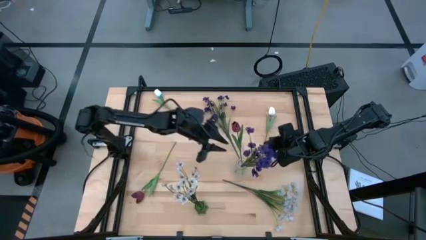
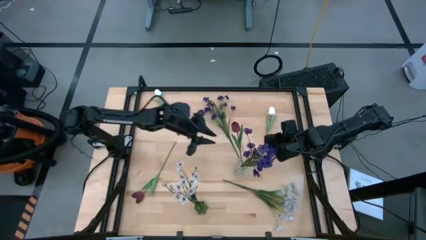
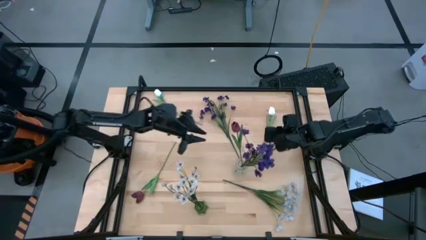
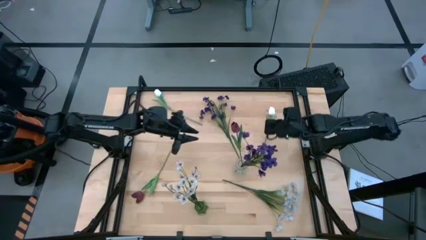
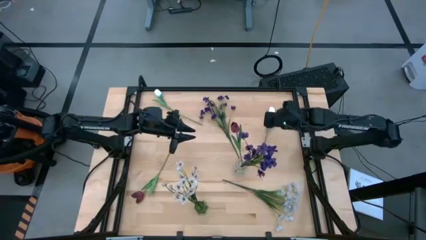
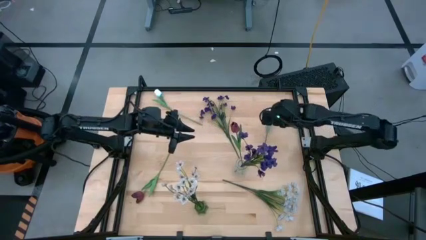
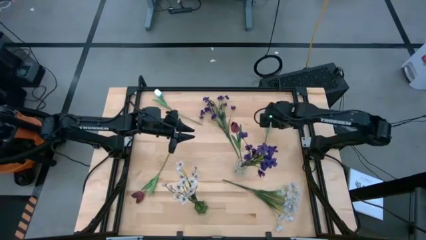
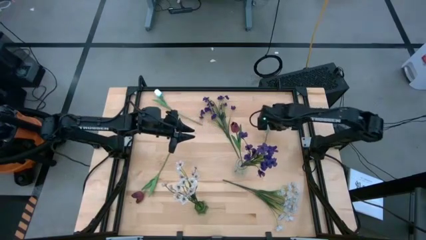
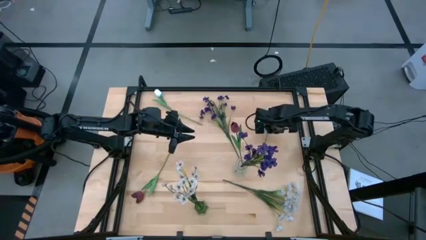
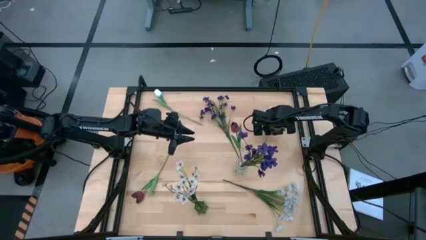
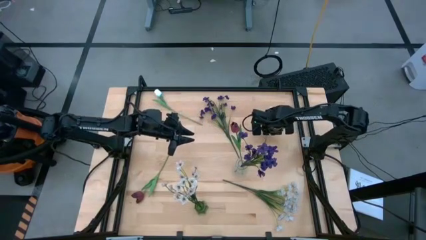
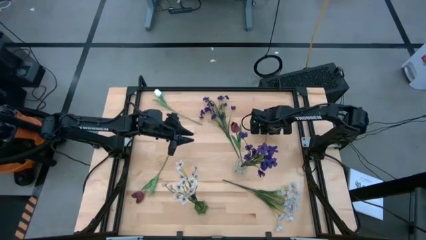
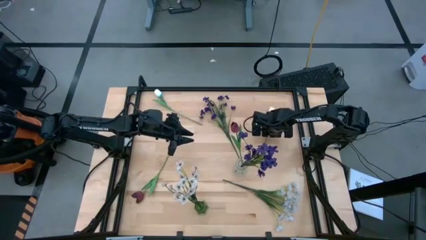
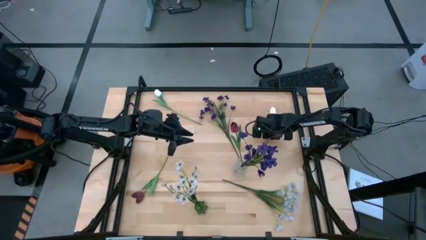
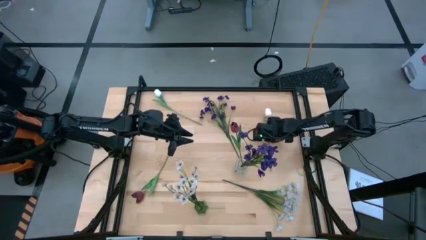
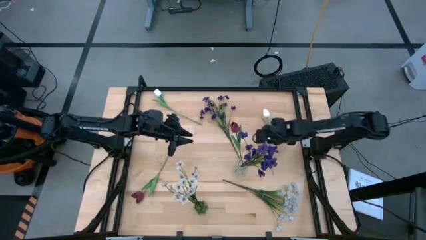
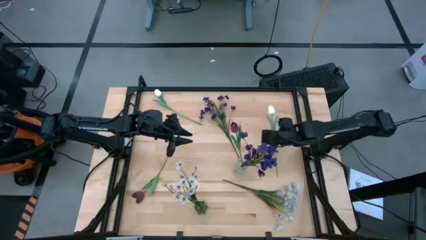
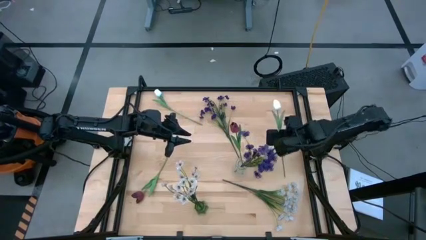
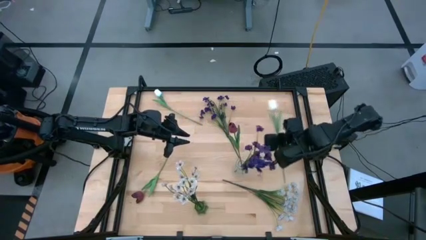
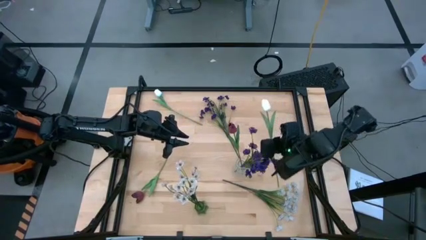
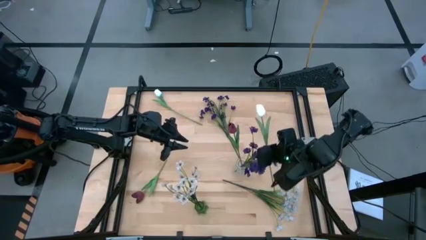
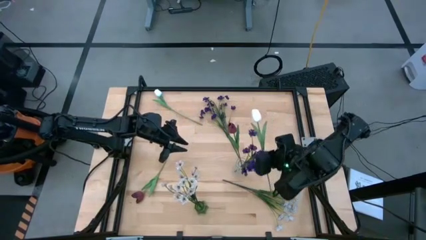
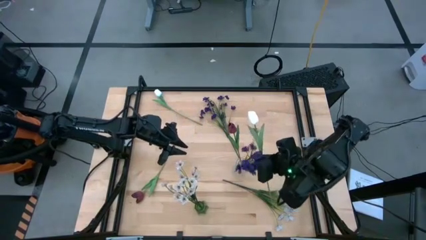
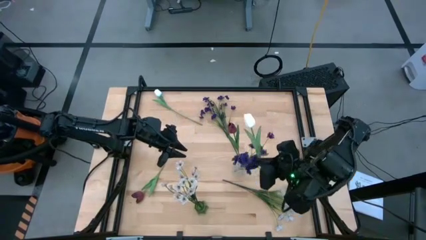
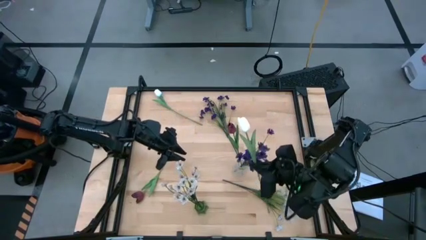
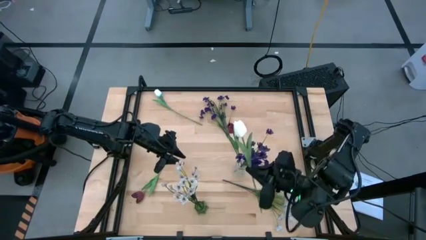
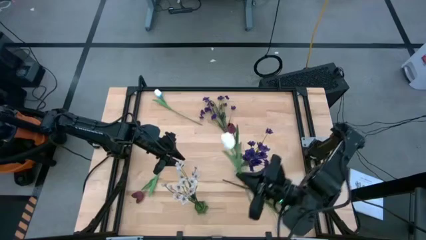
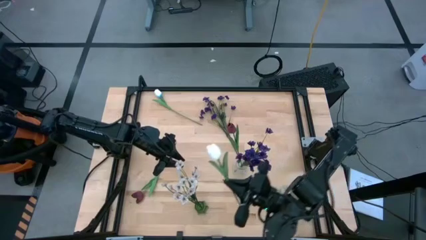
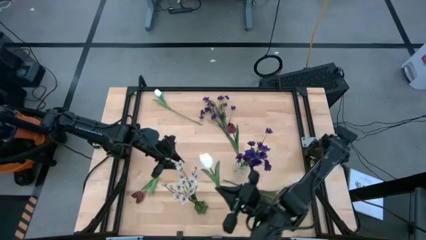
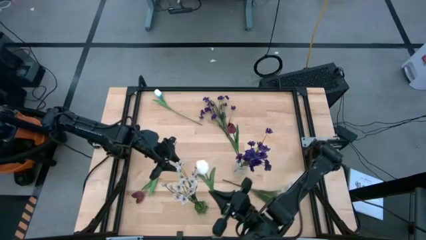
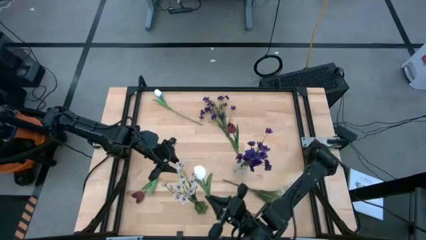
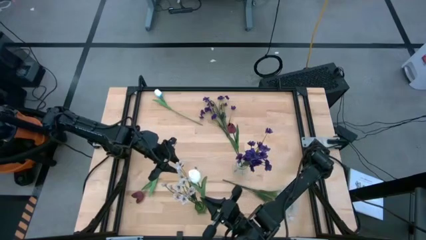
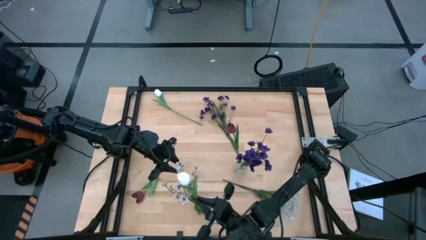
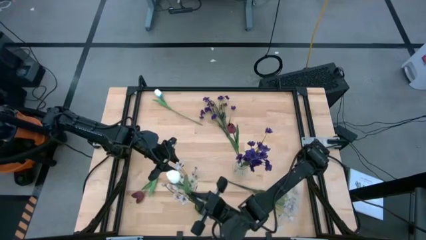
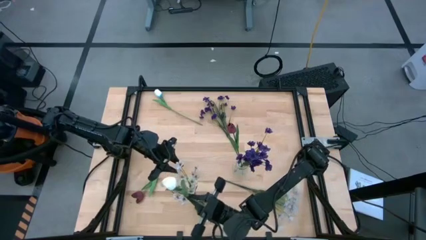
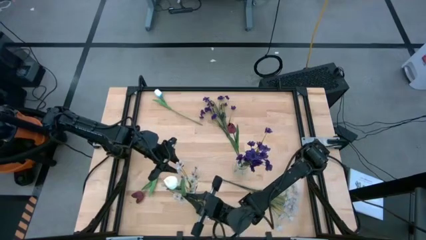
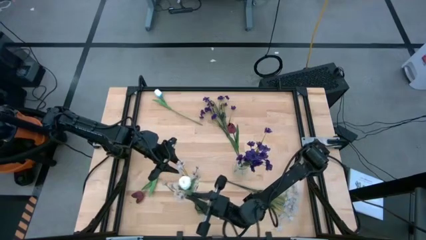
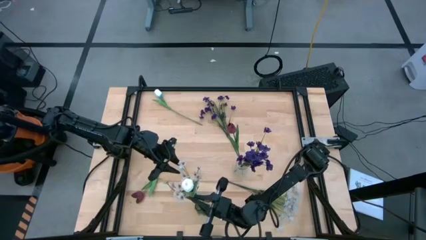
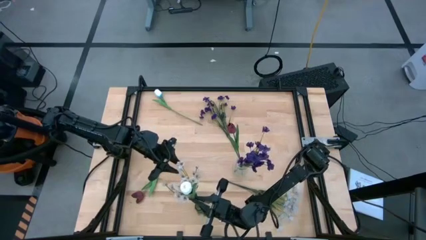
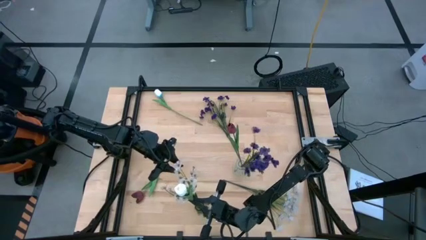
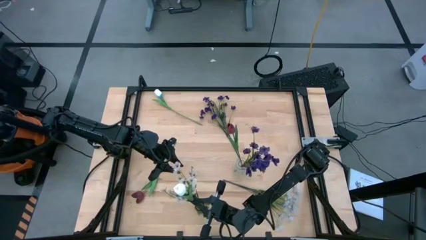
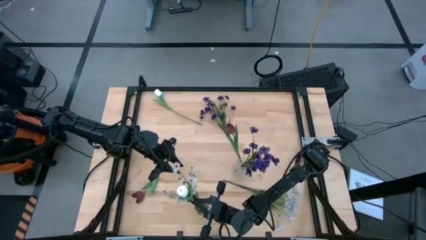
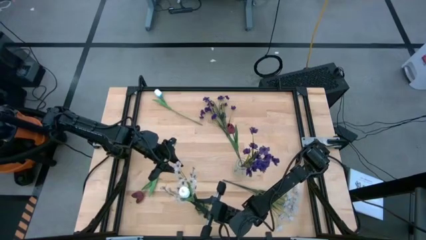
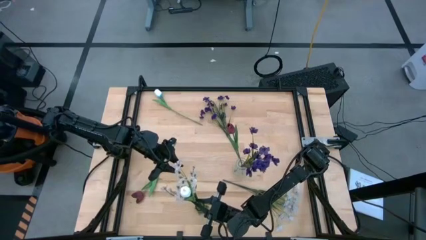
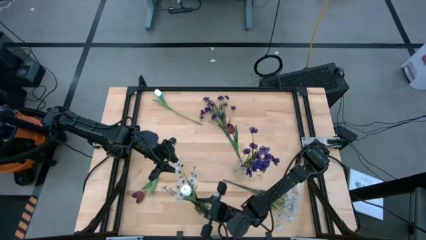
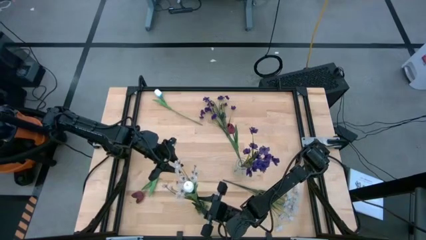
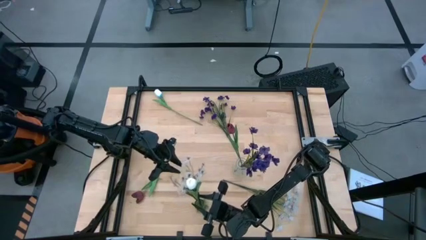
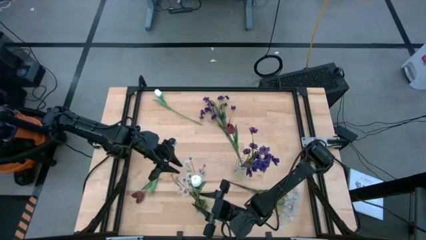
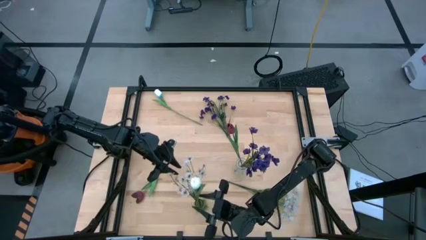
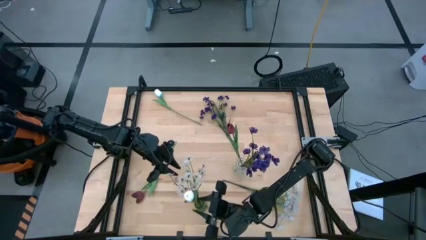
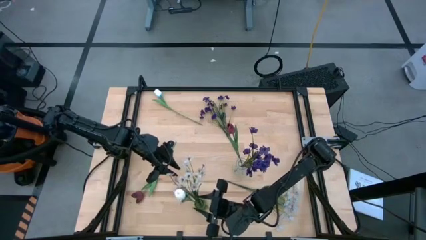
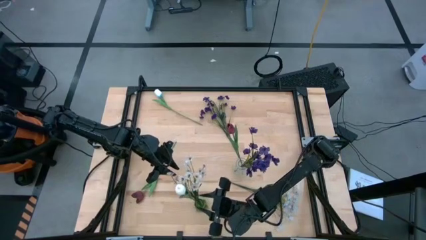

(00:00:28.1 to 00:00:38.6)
Task: Sort flowers into vase by color
Put the right white tulip into the green vase
